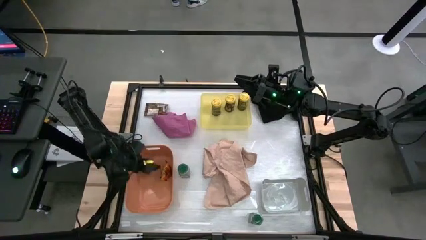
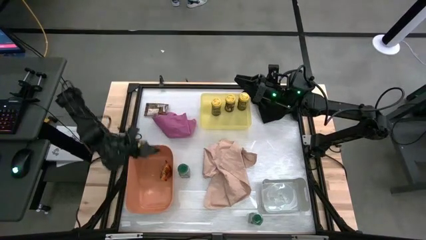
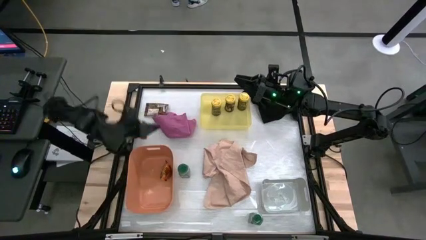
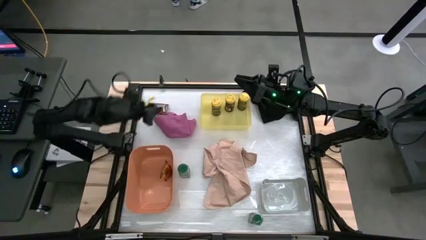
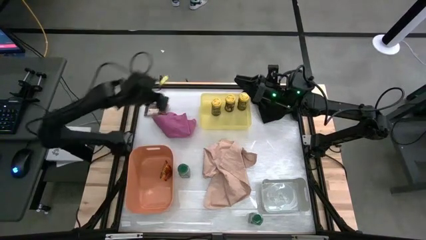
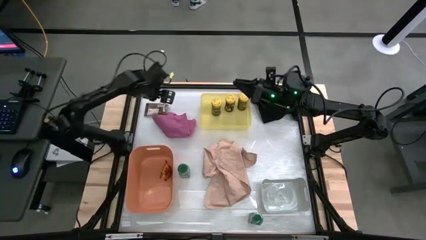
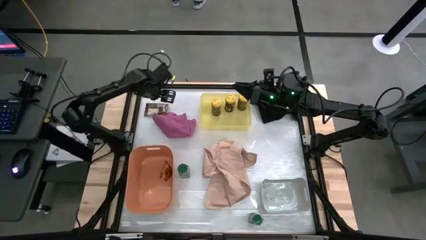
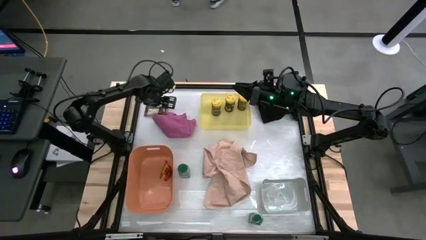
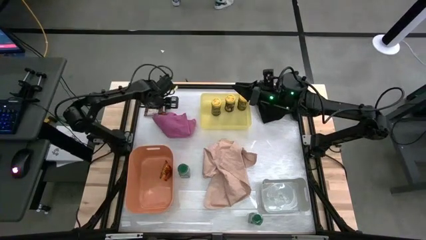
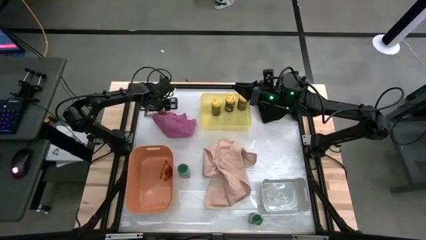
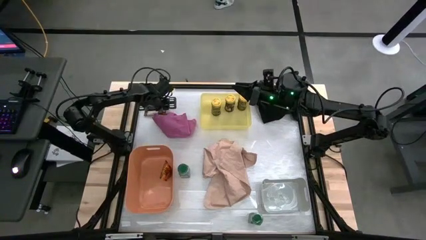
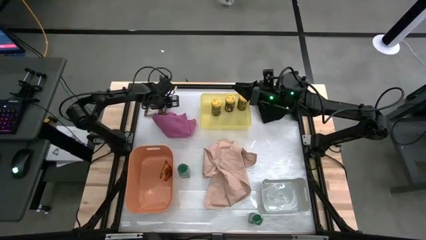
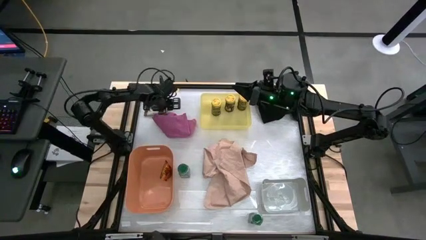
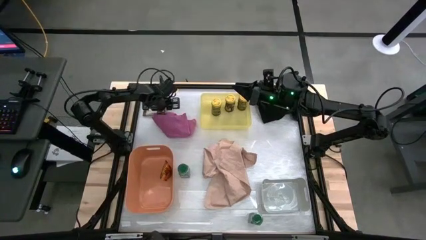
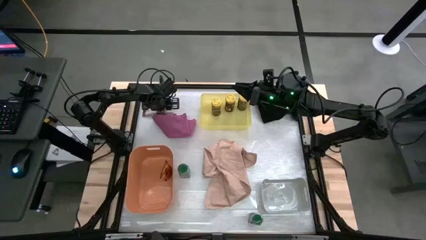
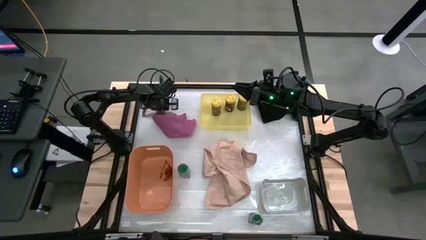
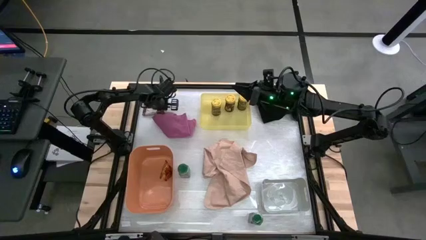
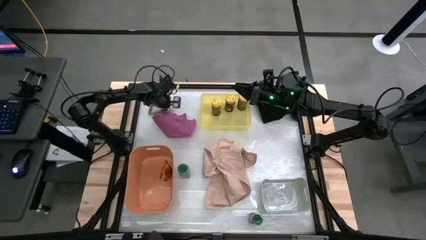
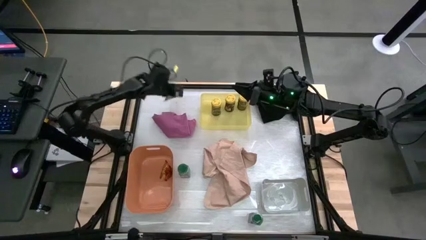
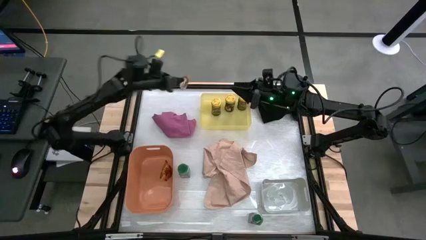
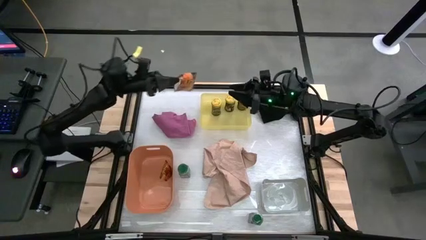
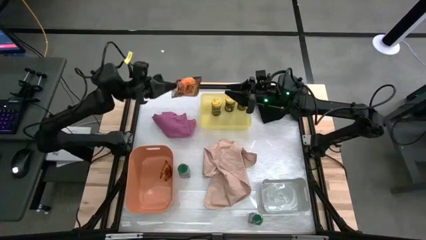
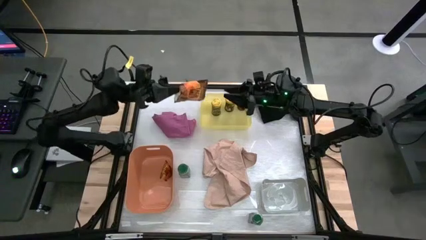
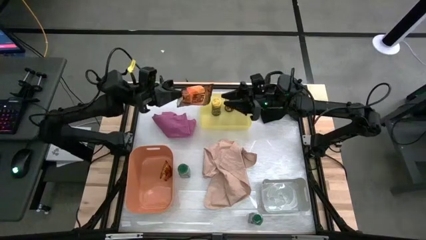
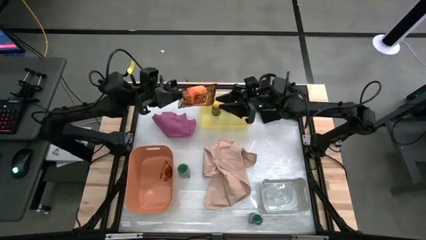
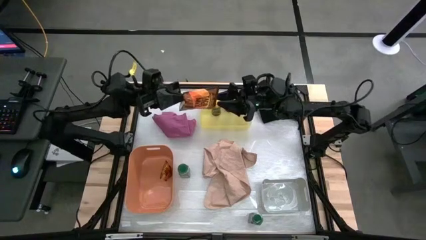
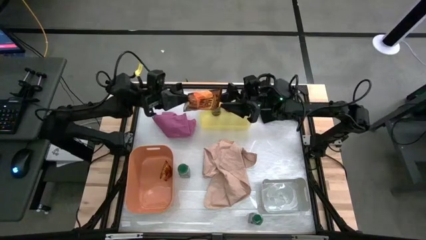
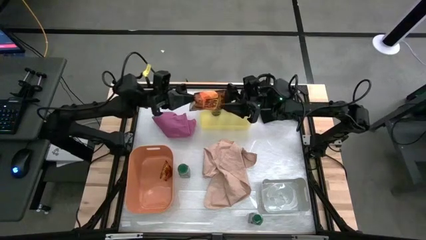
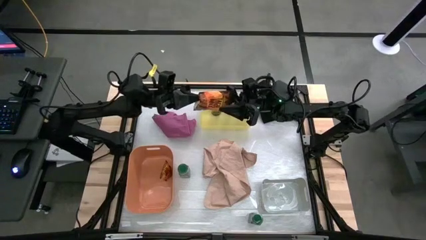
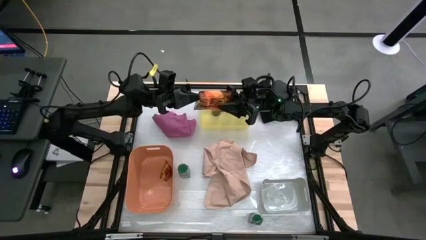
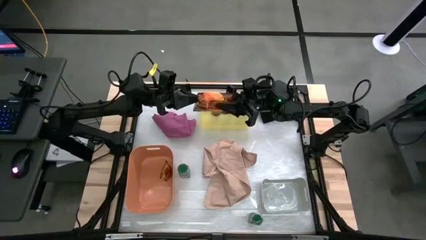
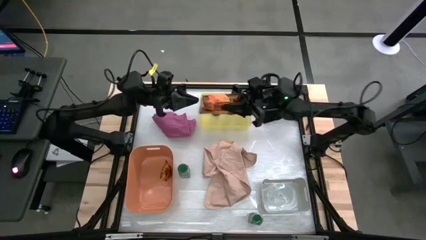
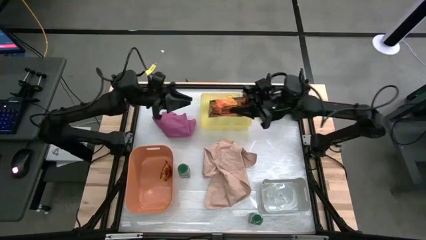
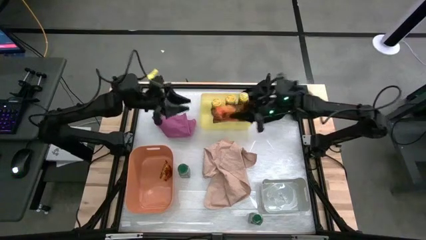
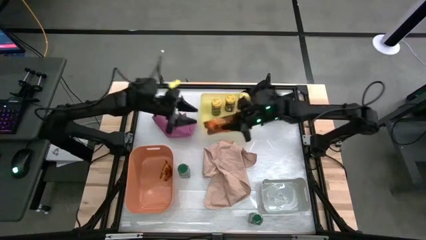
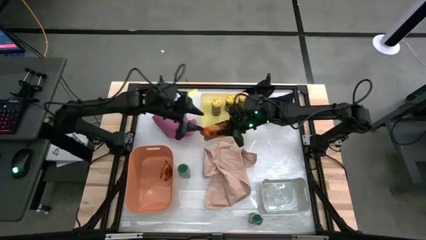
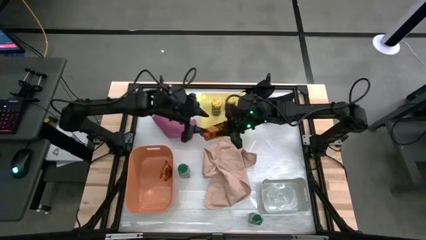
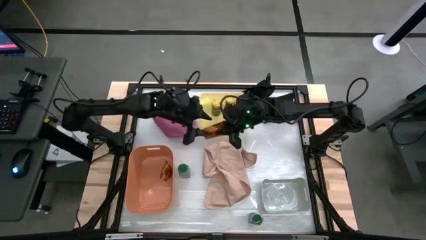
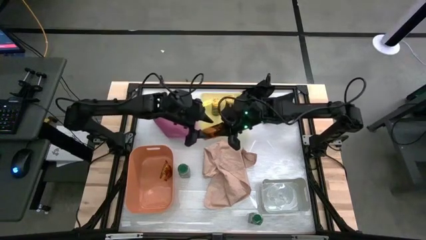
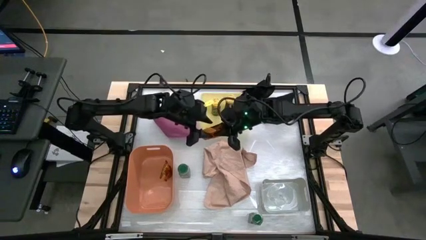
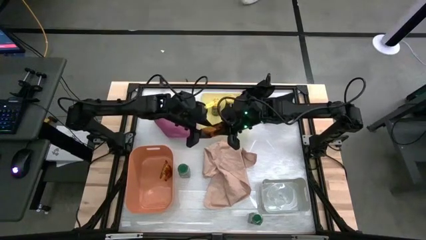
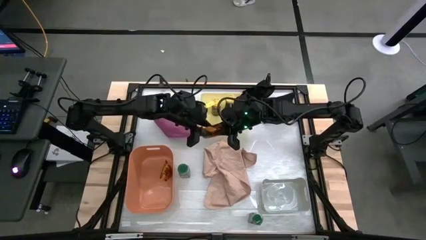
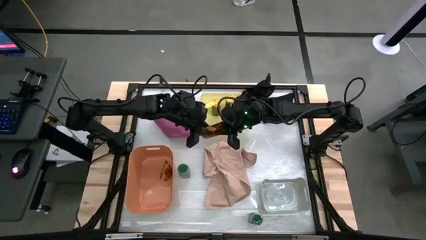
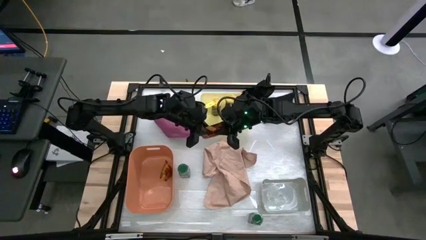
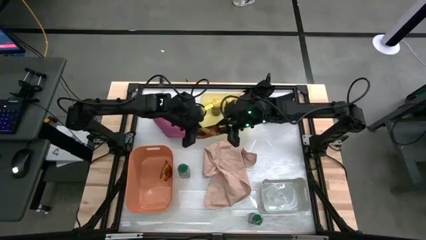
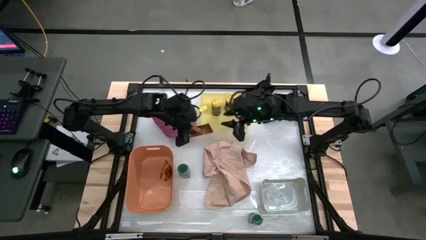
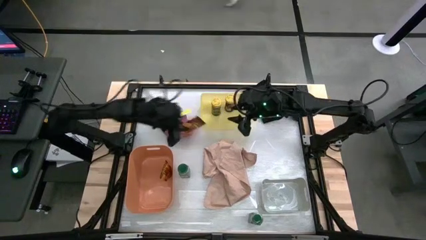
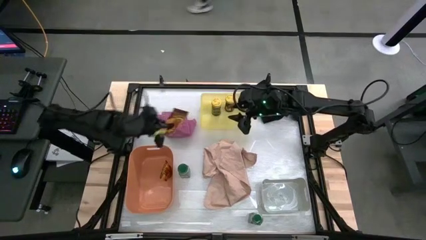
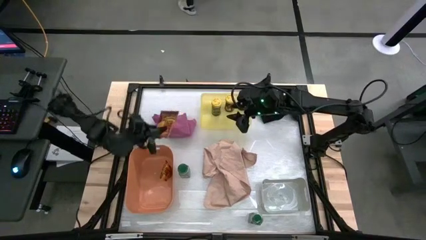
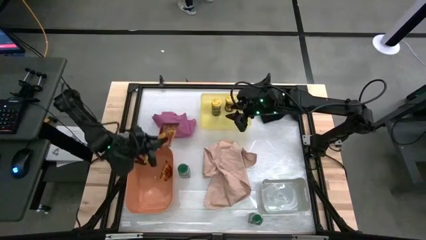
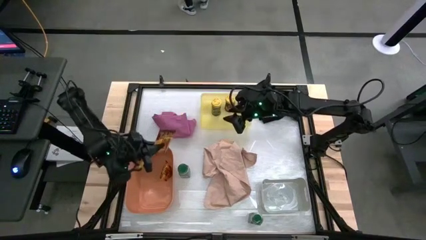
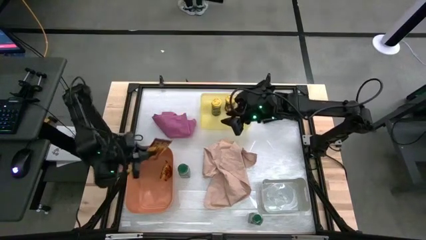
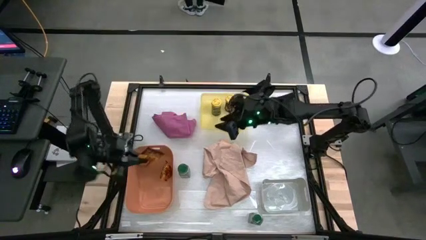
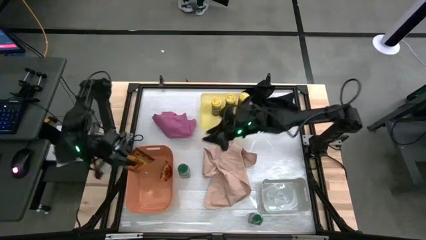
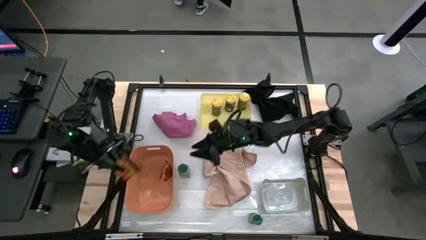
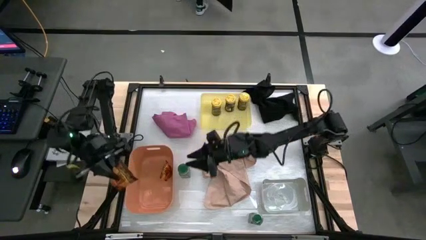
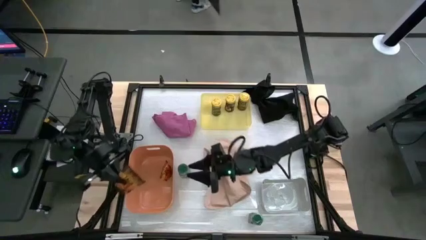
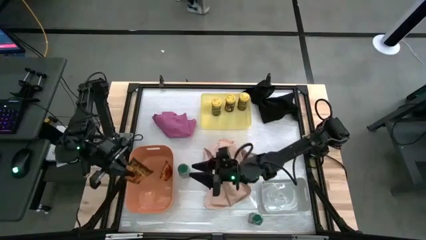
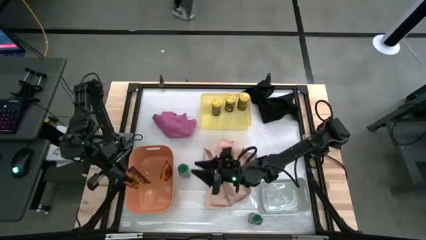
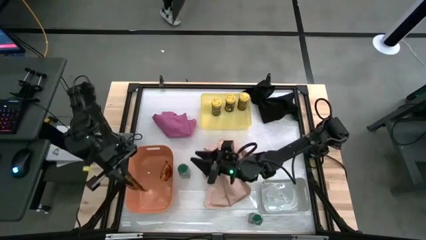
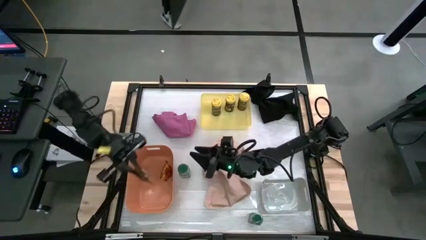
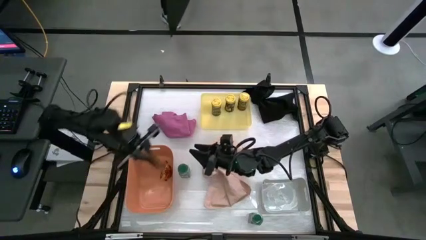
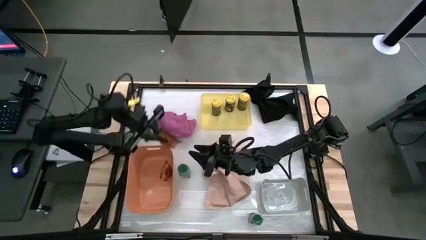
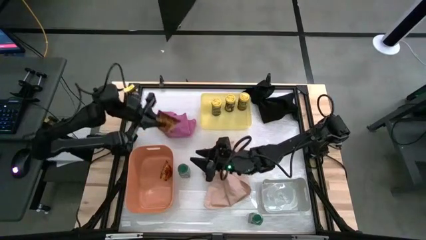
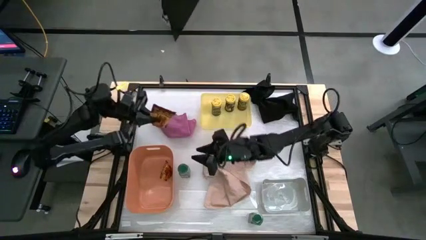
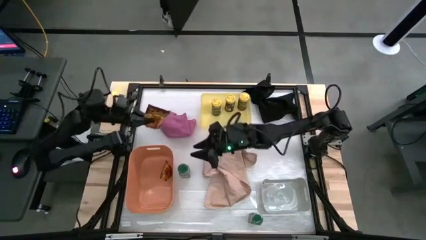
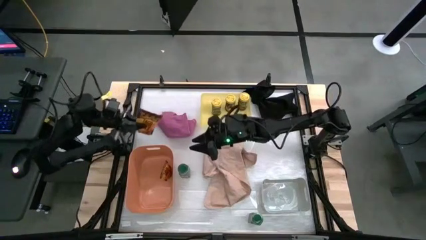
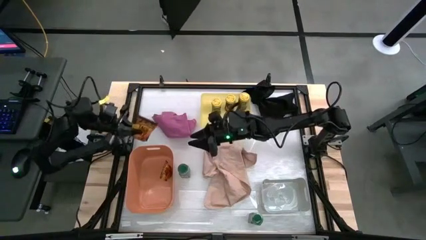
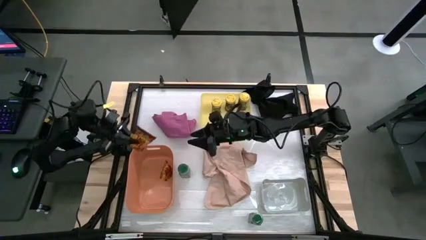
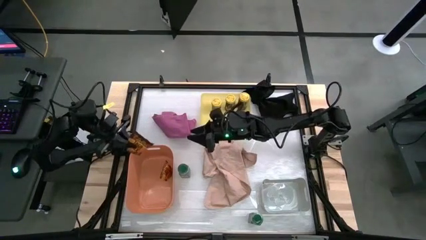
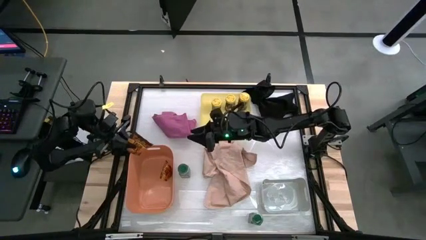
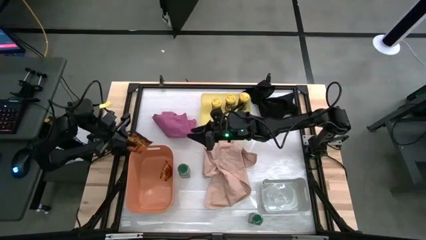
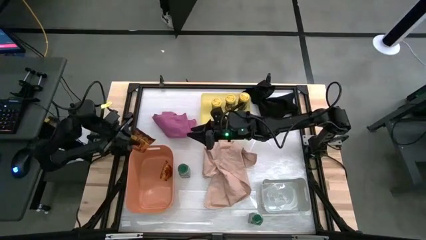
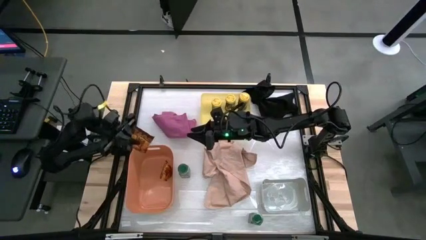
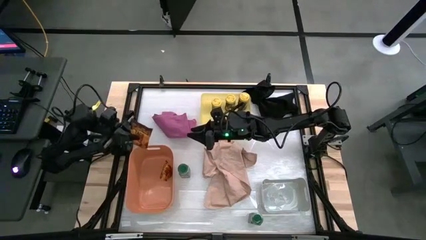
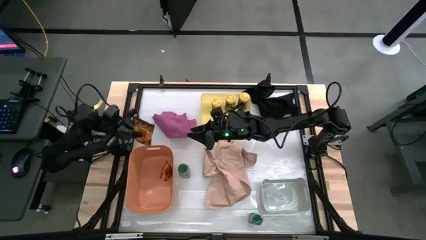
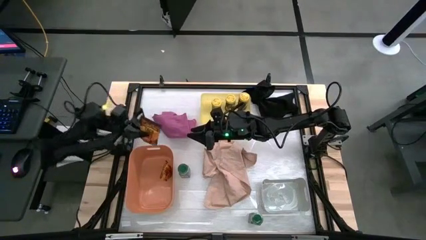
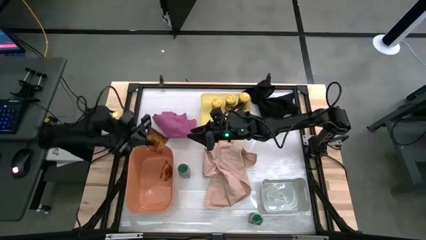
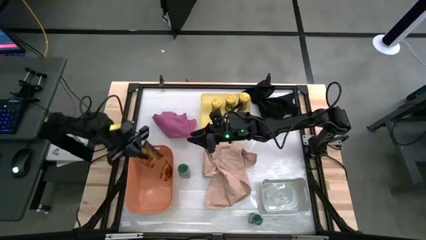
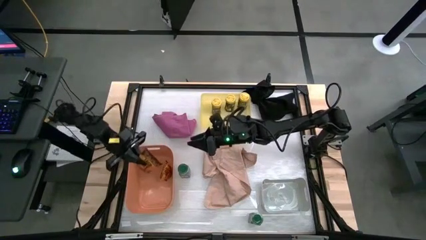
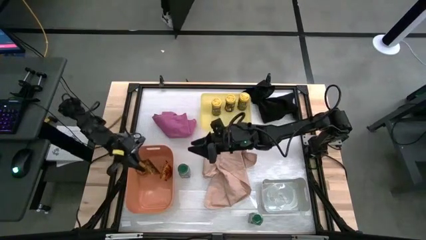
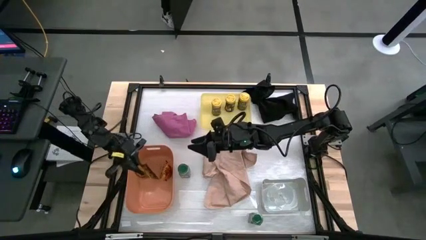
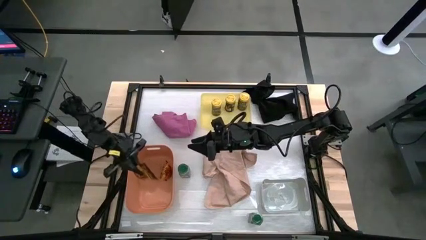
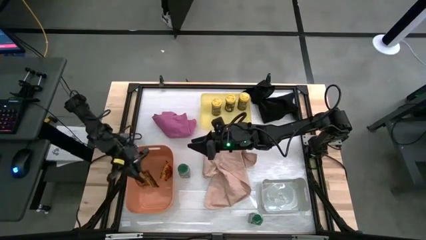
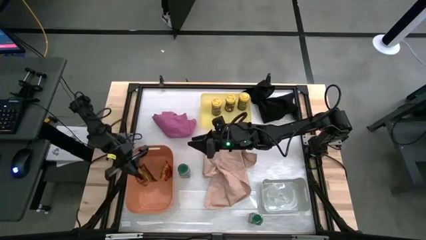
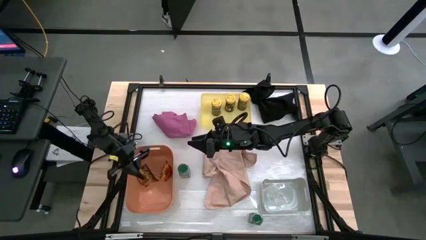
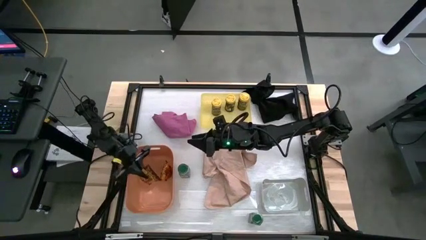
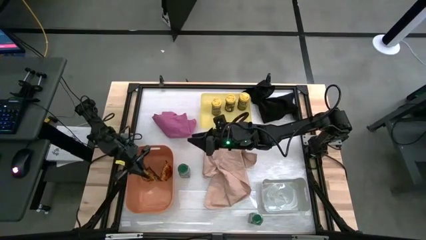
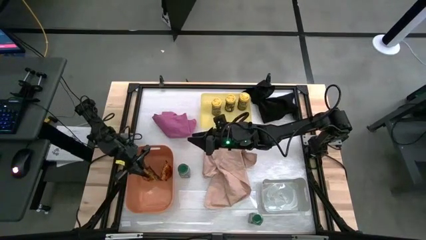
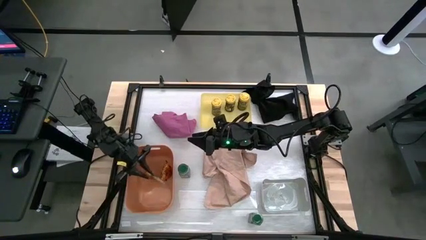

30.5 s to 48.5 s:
Task: Sort spices by type
Put the orange spice pack into the orange bin

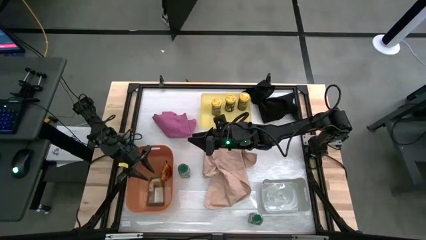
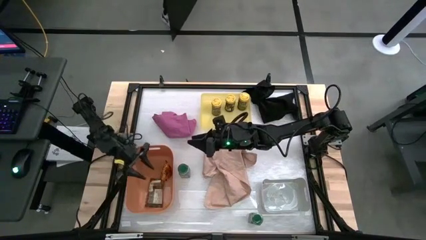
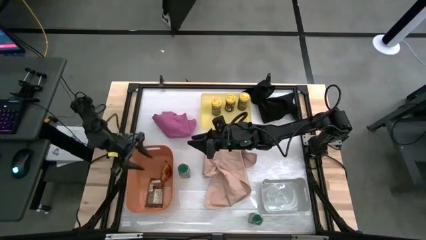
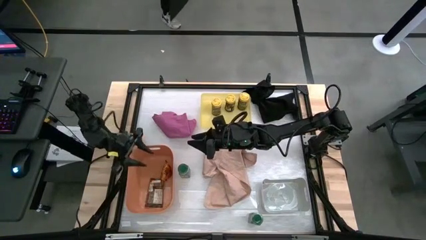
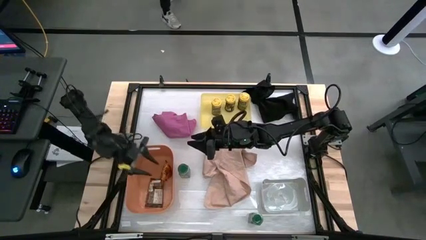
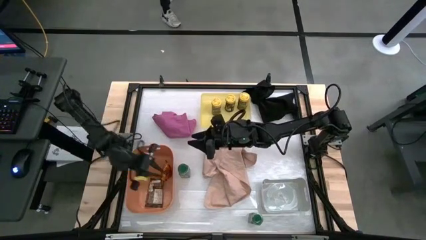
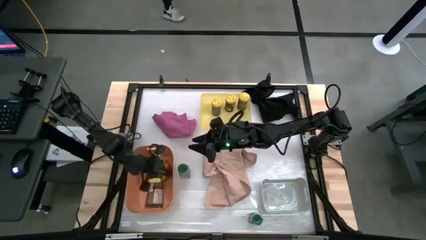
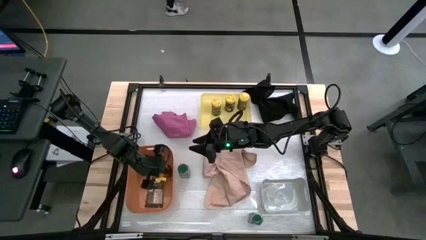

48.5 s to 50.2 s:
Adjust the spice pack in the orange bin
